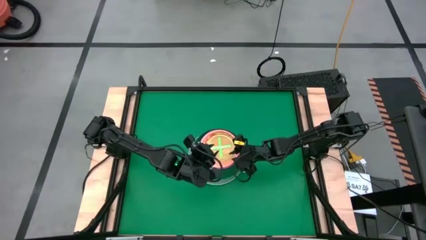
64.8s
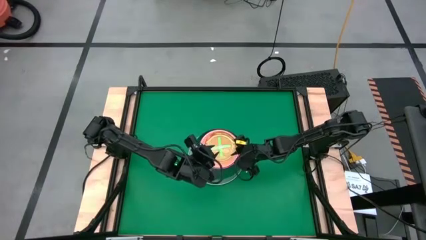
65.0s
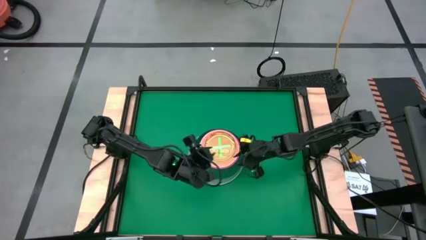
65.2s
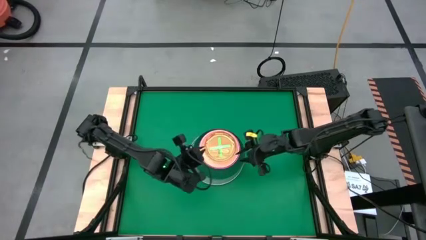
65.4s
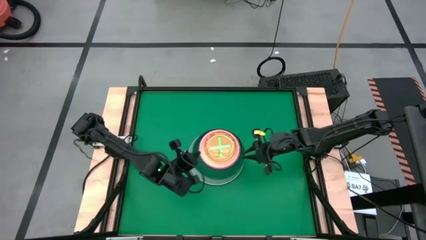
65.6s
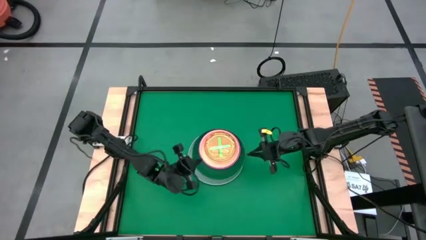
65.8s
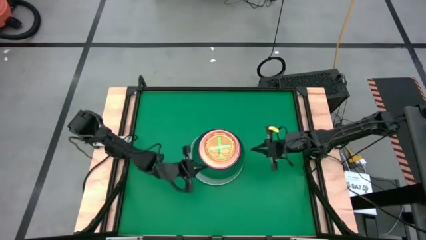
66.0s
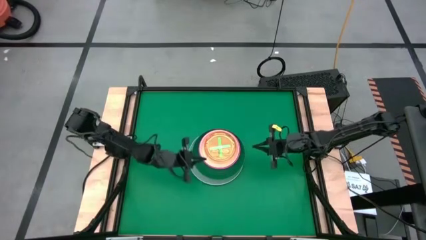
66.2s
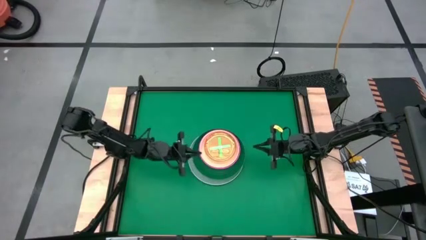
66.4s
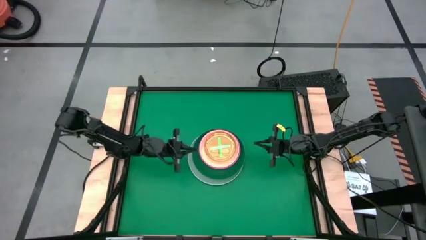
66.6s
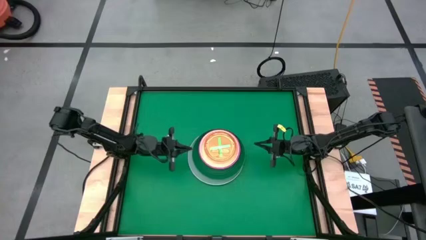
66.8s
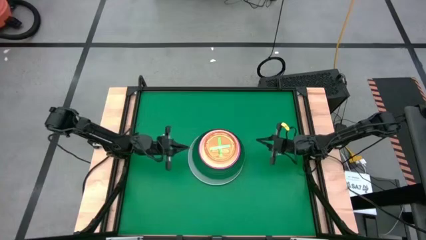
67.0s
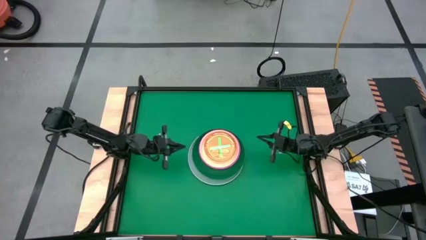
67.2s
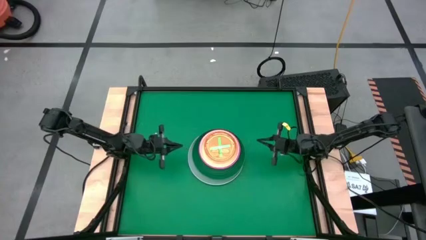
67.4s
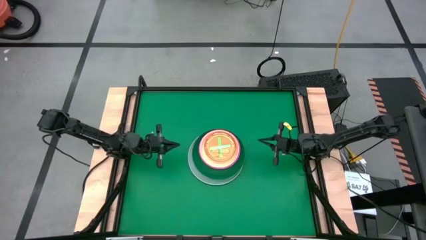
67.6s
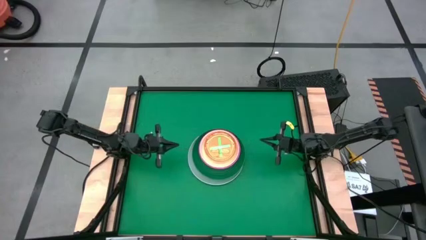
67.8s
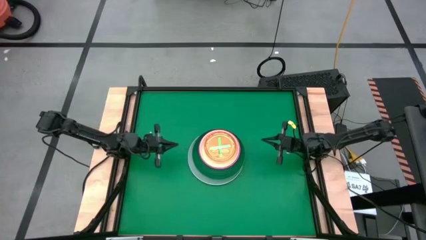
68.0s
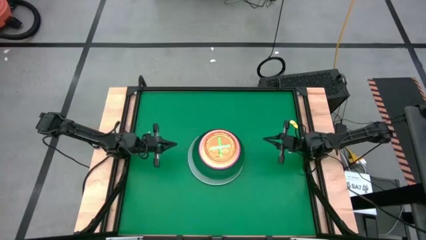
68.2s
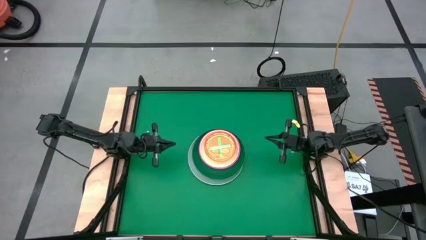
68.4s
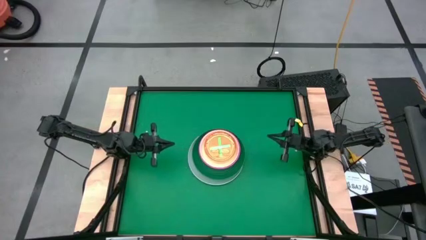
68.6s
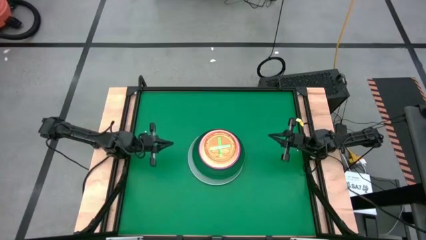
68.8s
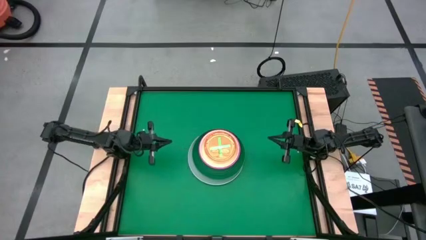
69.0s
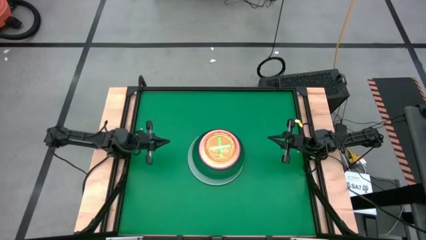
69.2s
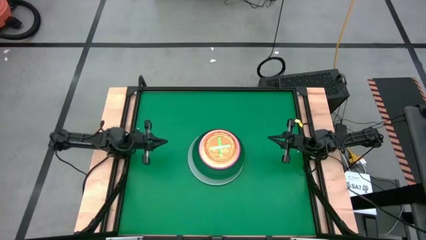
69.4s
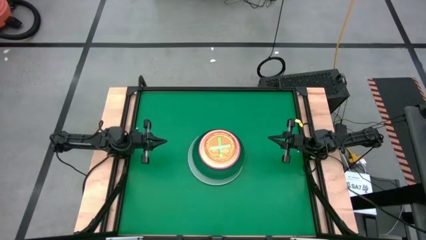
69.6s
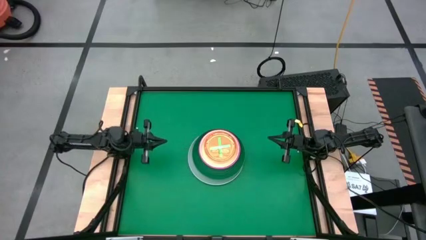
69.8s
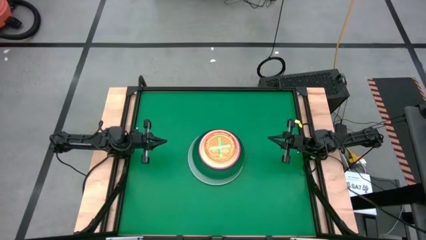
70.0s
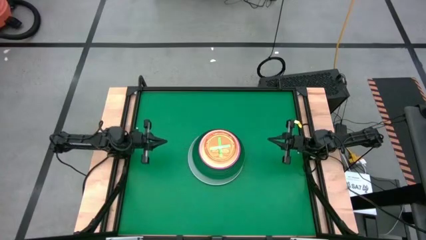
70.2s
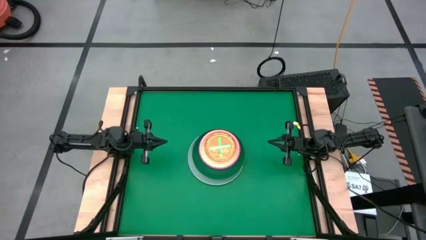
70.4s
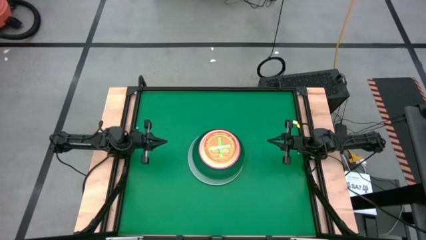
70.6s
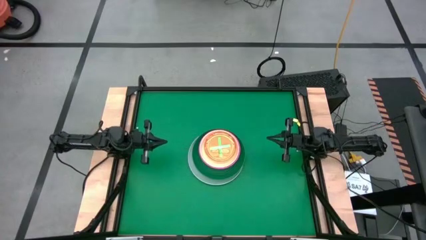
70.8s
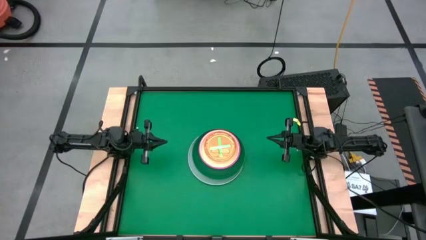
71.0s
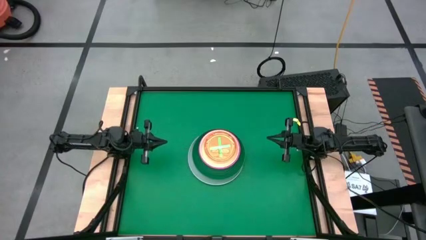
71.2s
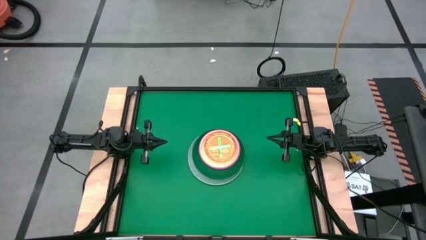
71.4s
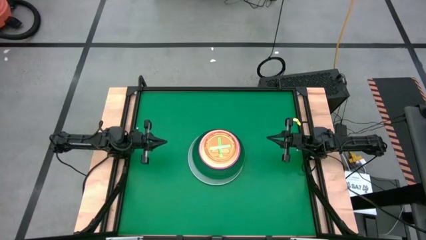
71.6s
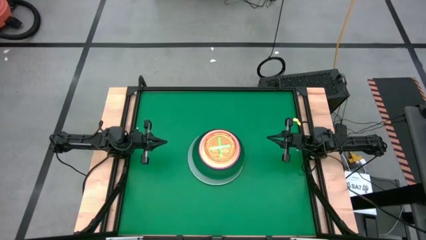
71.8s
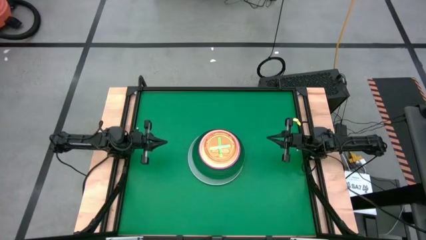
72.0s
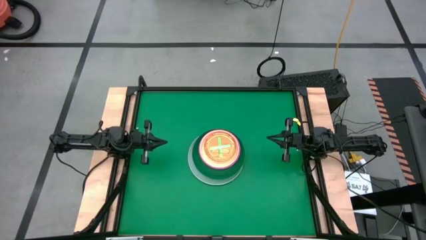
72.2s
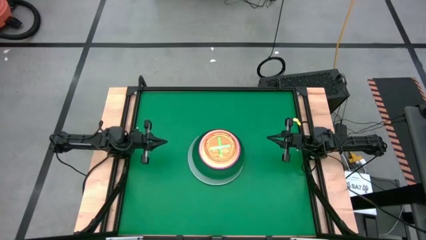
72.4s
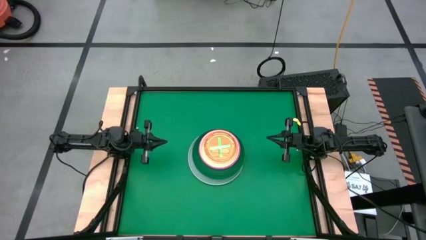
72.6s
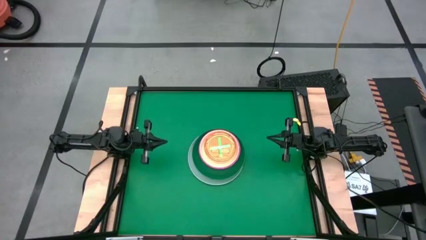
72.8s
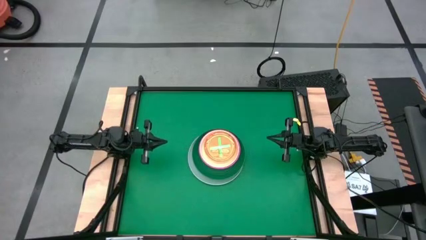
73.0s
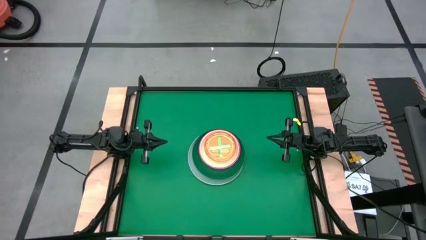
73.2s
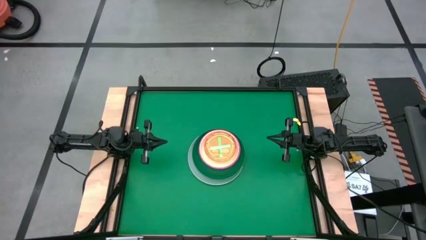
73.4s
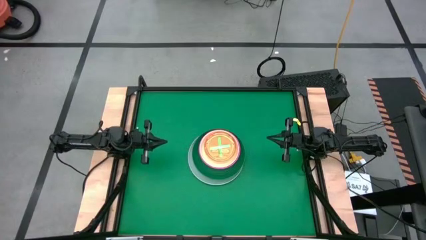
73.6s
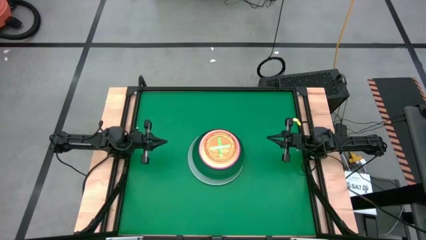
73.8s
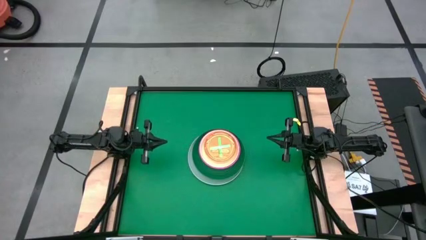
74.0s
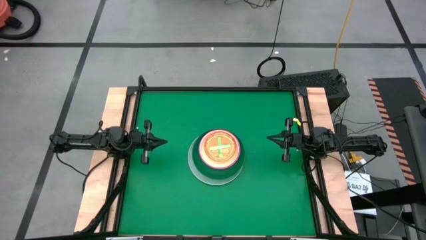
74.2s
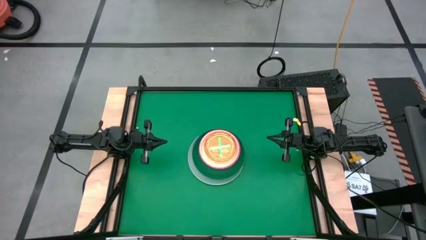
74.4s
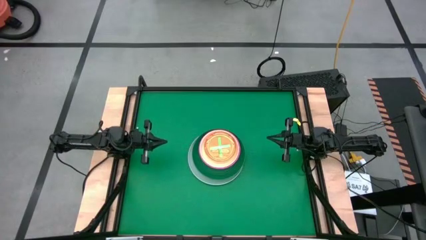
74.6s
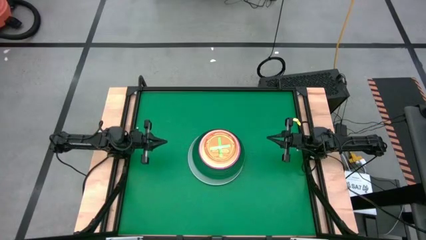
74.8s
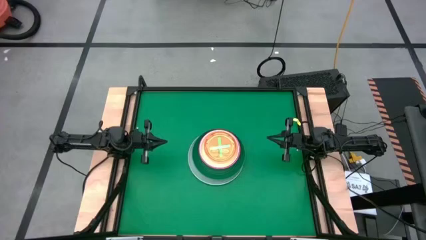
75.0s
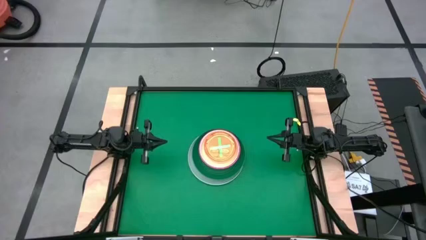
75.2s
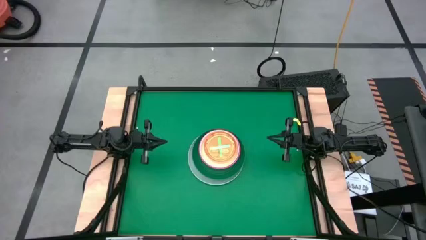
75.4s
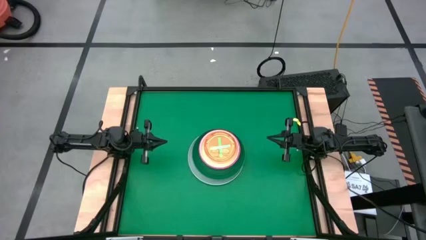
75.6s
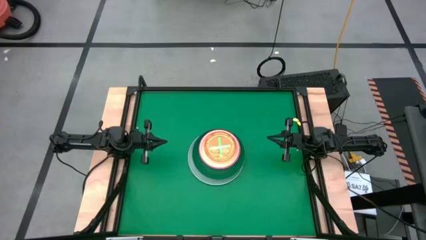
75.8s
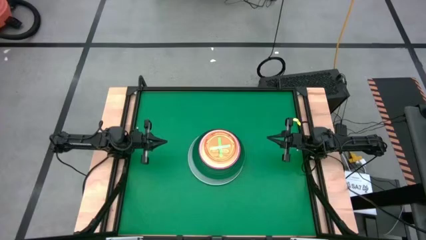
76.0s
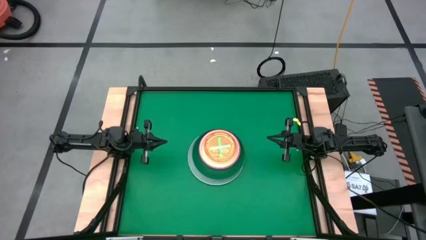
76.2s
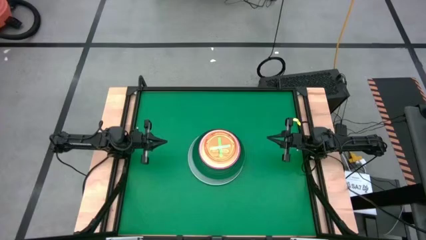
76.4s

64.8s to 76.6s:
Task: Stack plastic plates
Return to Home Position

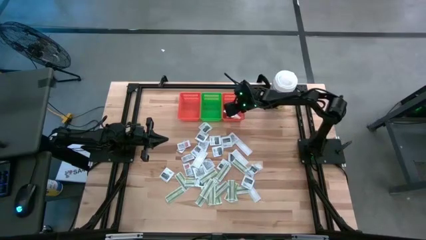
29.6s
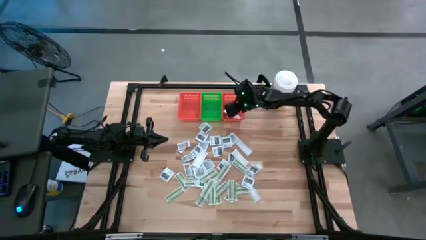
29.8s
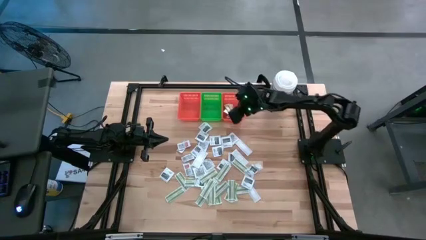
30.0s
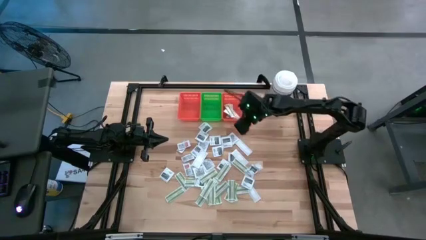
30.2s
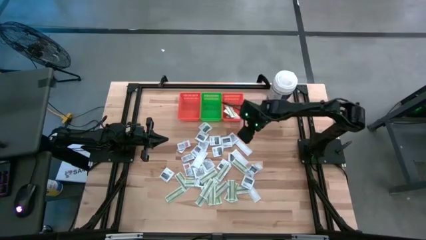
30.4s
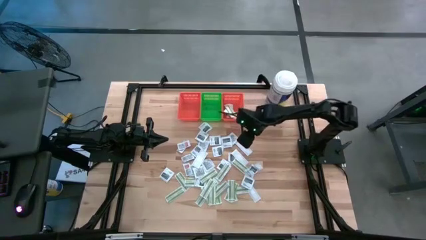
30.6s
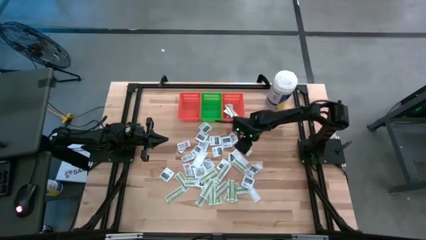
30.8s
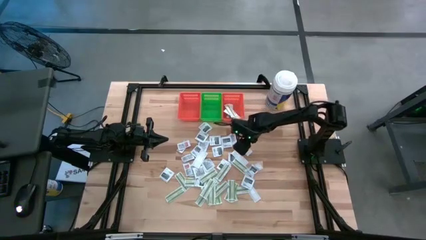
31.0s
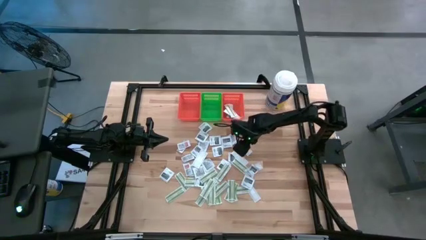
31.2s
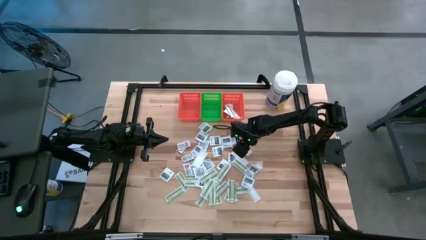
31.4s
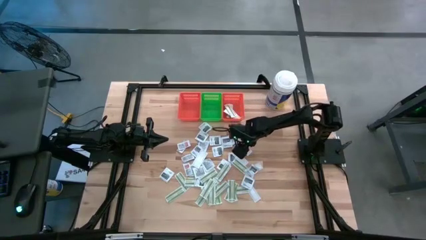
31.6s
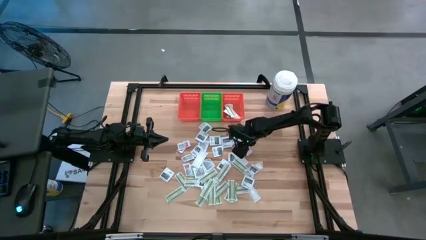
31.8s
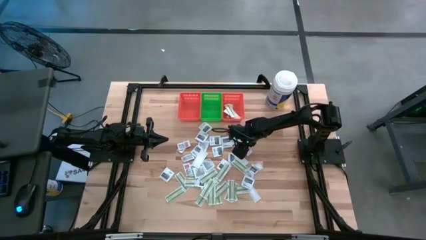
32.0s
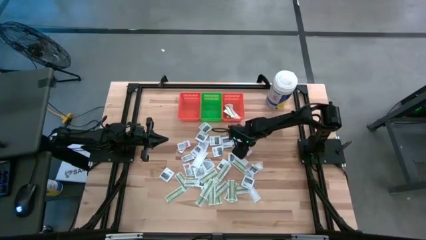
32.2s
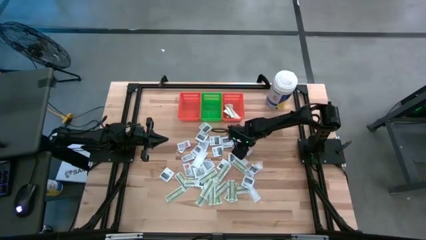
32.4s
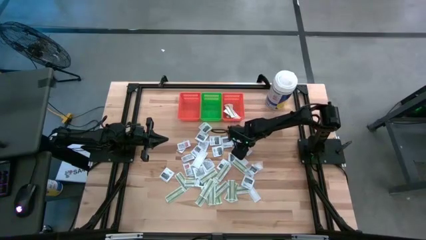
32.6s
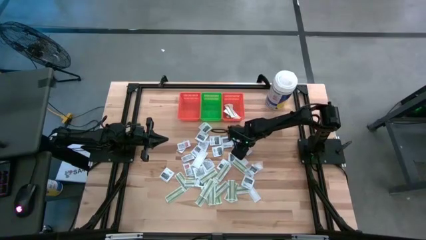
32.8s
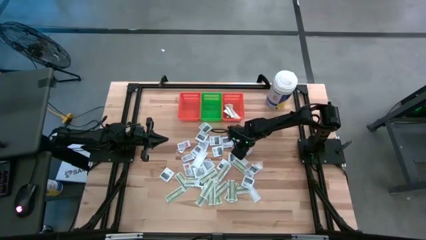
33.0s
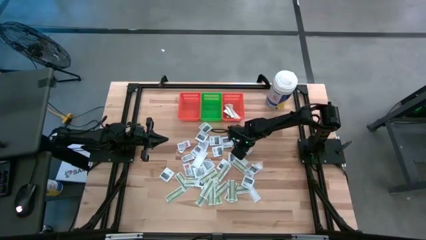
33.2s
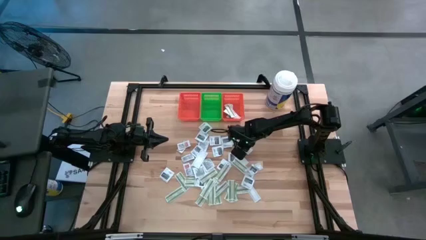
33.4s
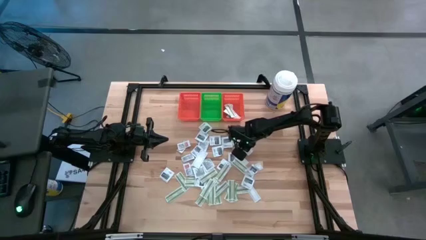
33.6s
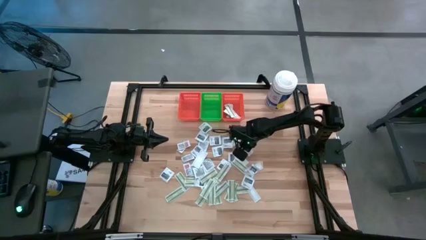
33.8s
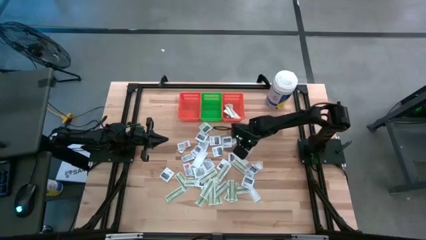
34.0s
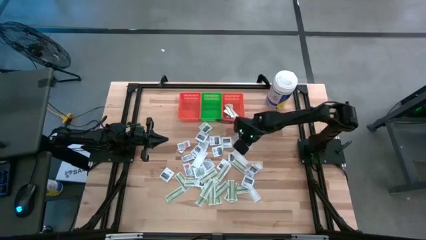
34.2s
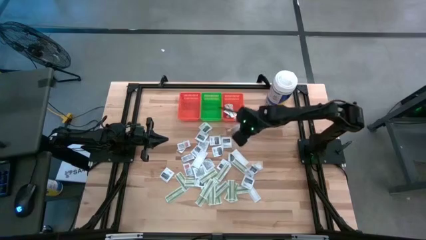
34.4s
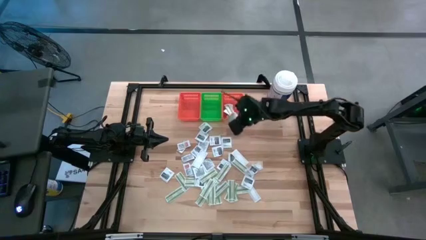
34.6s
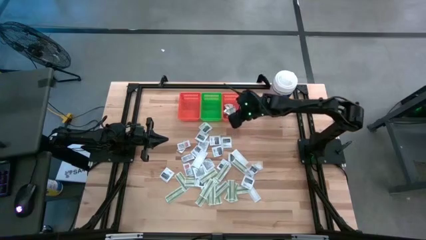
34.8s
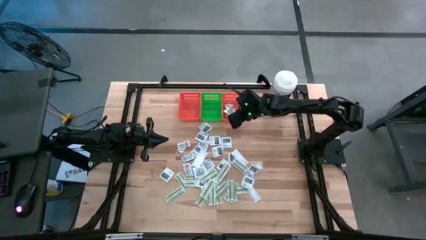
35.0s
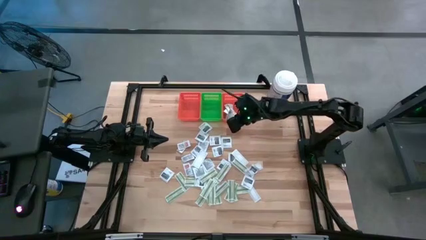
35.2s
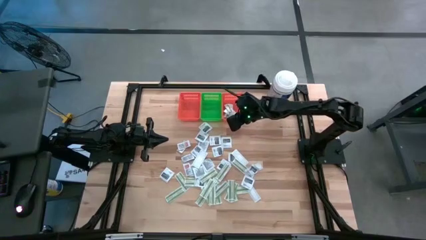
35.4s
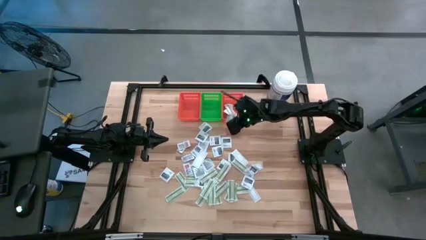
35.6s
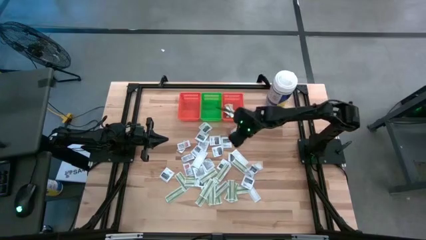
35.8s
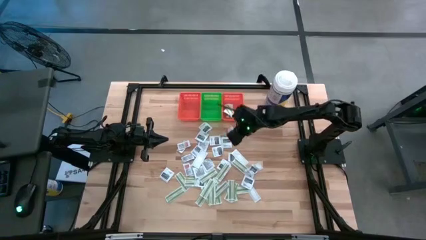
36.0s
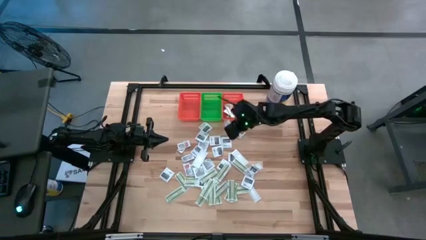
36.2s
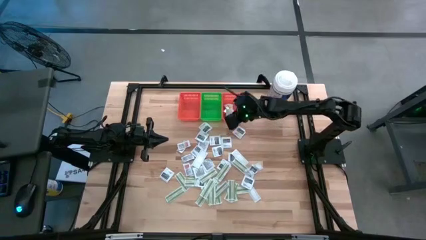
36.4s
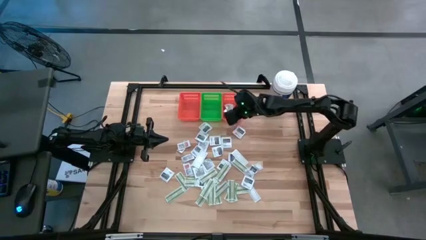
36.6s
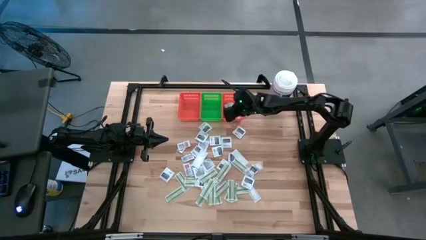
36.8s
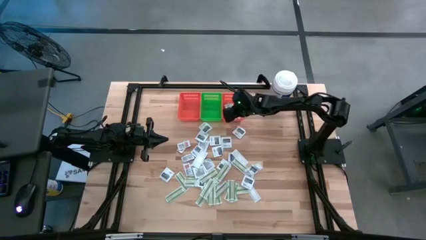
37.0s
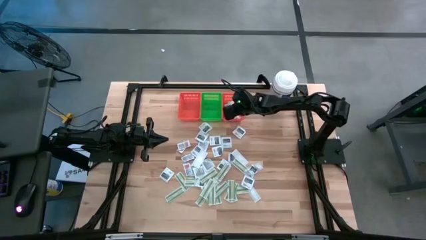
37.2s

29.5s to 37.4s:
Task: Pick & Place First Aid Supplies
Put the bandage pack into the right orange bin
